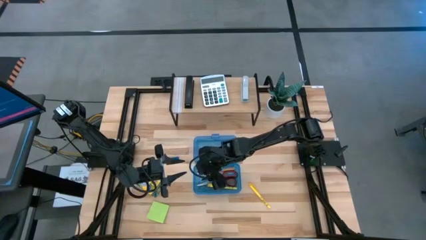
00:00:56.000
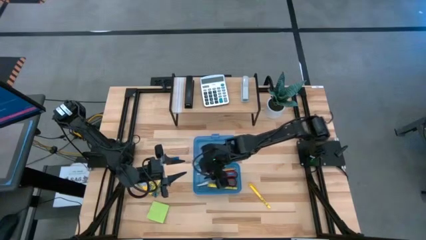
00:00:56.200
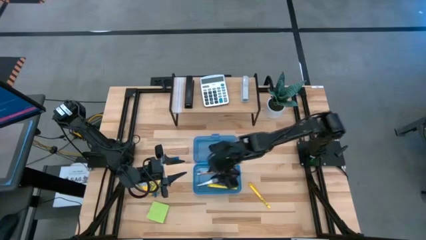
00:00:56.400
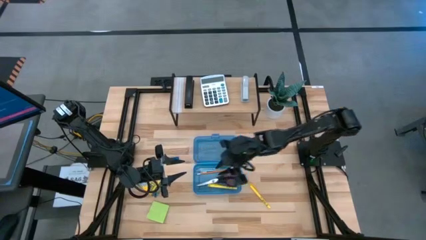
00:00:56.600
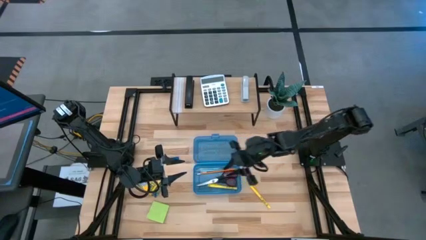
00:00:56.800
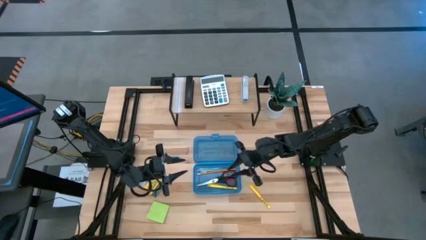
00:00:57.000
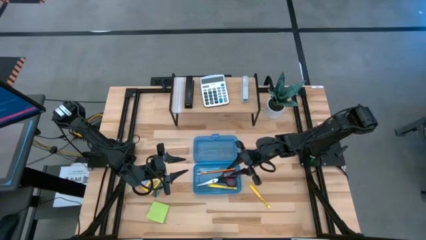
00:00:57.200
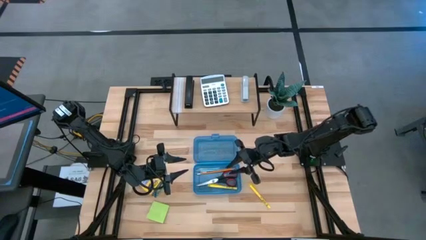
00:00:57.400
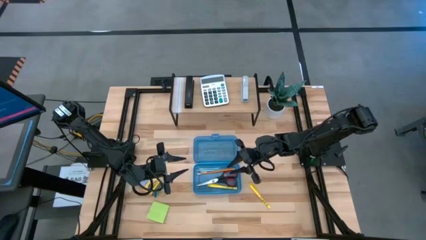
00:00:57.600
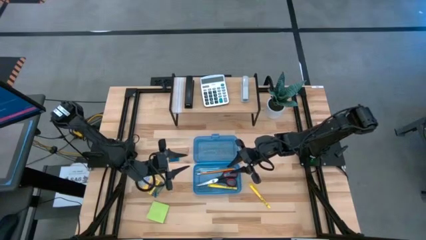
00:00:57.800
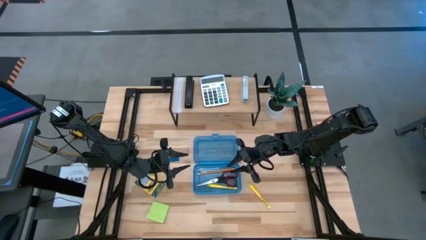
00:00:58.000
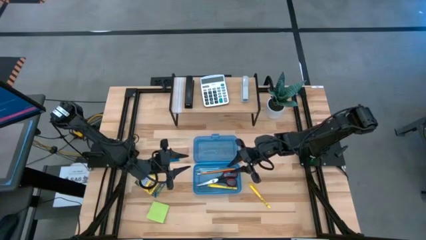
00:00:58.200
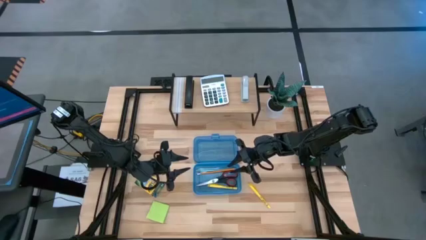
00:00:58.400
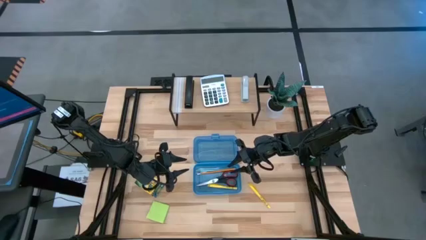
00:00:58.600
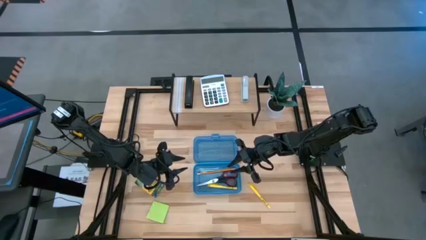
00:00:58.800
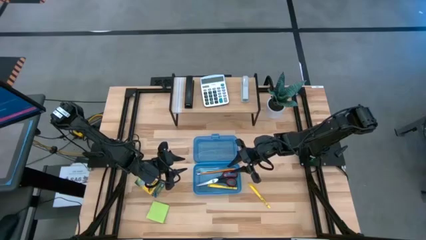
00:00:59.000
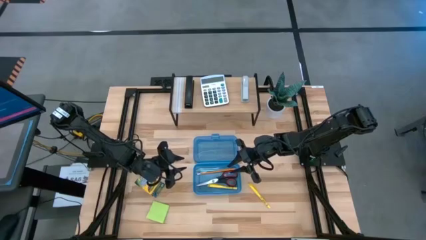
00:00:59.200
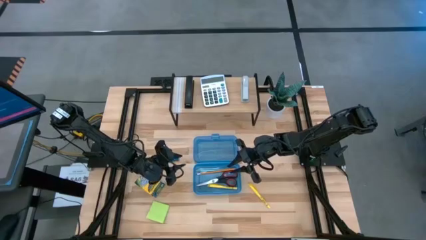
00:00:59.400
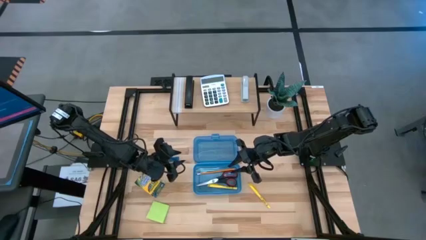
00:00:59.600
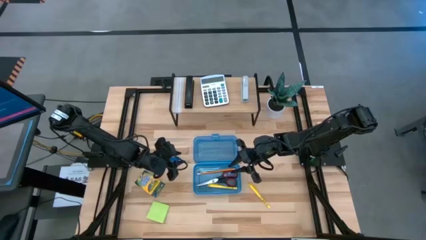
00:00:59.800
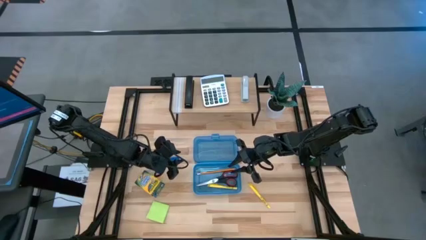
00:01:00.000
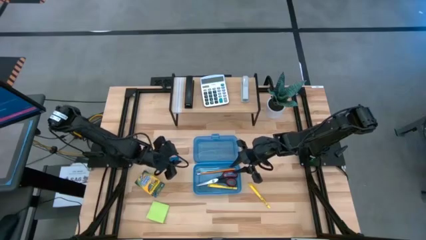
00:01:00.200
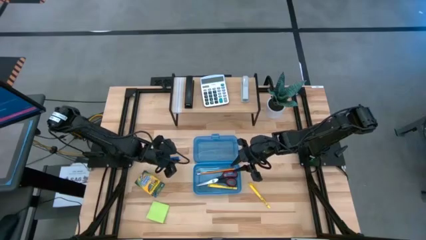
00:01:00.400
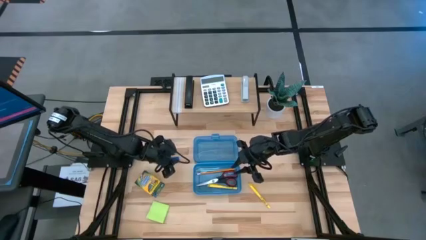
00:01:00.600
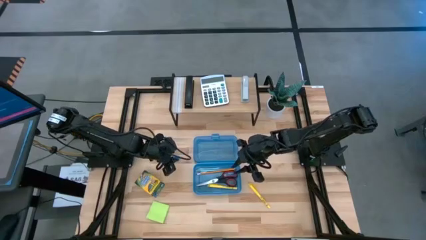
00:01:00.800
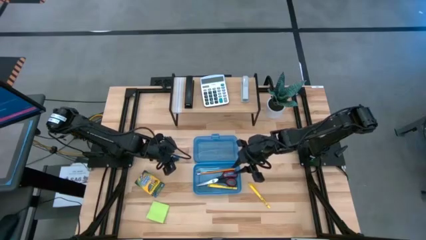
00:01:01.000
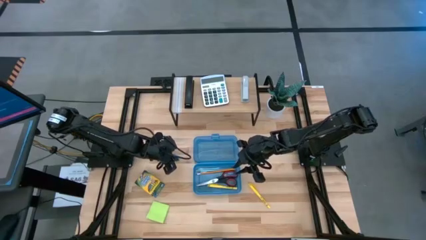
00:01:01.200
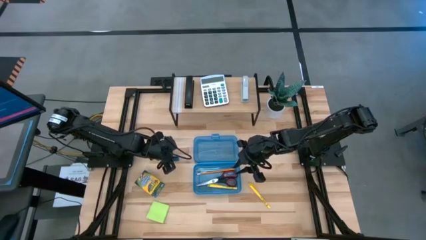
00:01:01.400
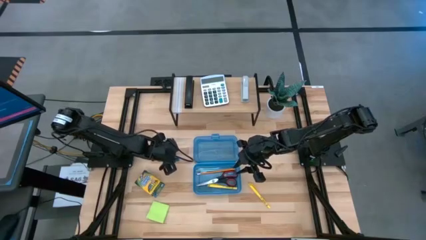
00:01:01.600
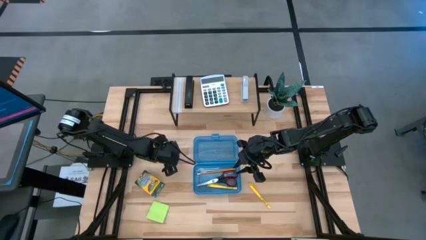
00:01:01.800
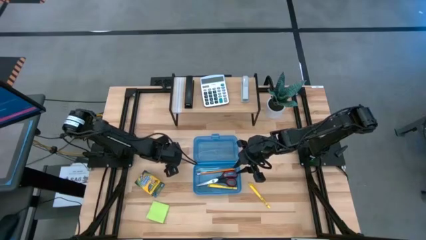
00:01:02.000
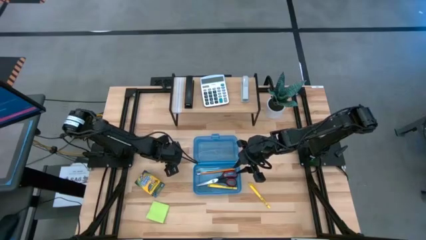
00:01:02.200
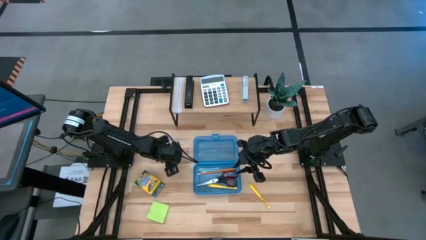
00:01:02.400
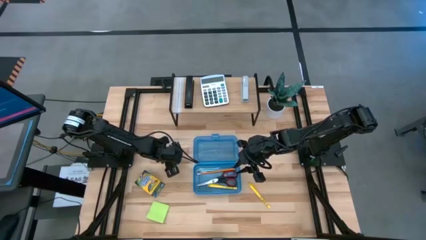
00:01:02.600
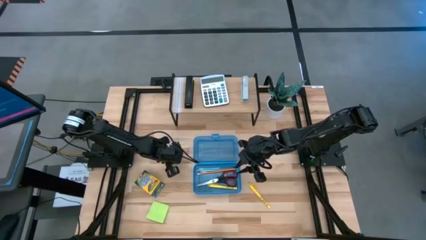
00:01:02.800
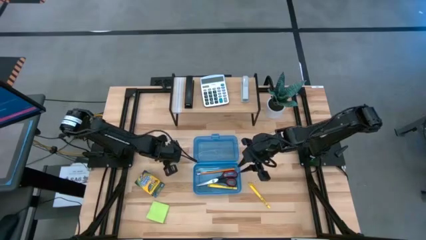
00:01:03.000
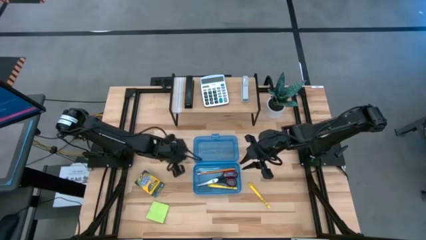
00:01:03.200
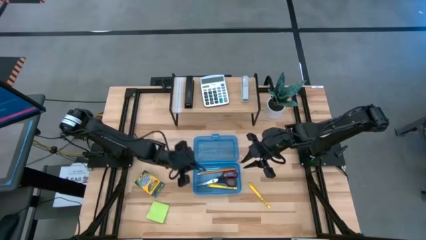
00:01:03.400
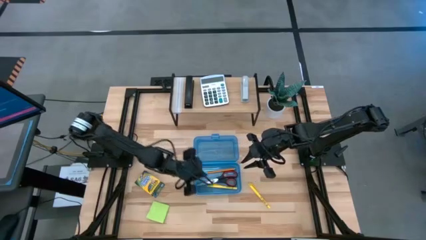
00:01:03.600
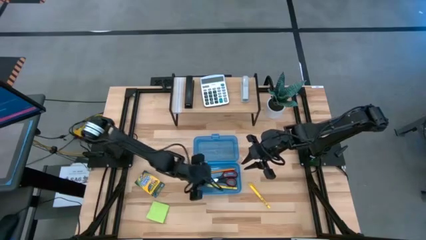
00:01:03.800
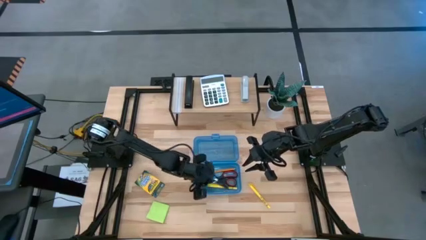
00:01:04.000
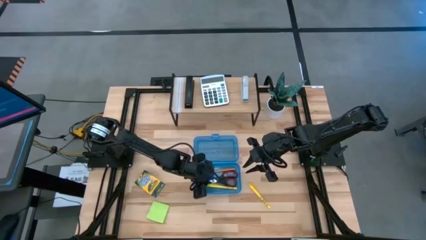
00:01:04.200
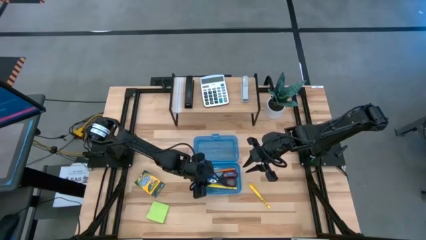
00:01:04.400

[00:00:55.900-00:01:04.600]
Task: Pack school essentials
Put the blue eraser into the blue supply box

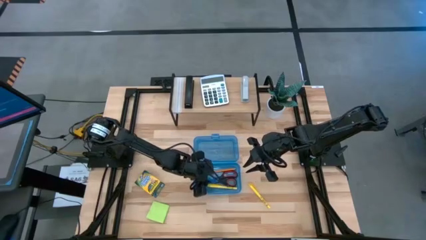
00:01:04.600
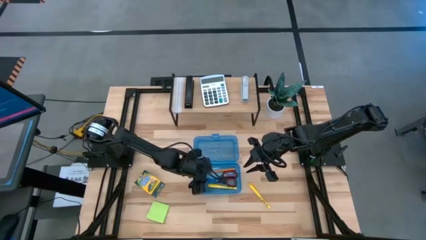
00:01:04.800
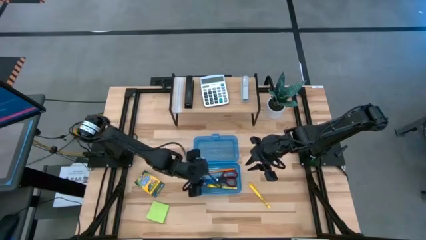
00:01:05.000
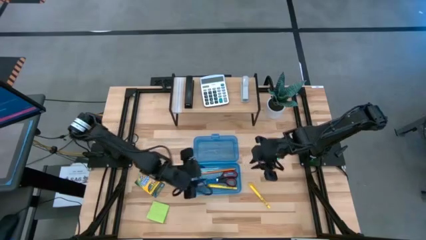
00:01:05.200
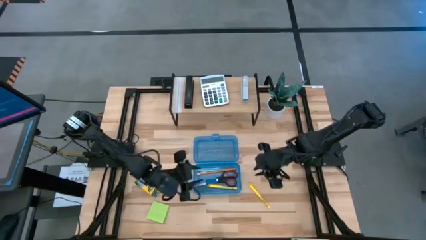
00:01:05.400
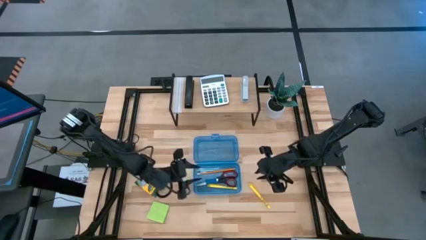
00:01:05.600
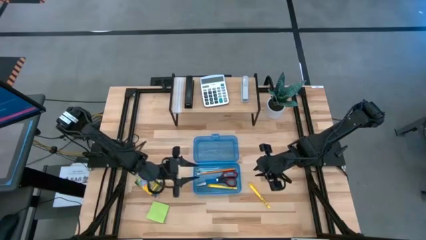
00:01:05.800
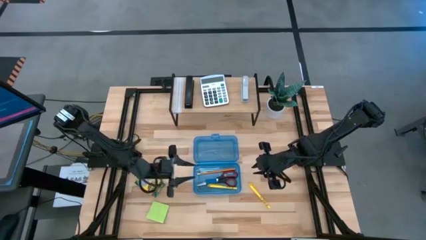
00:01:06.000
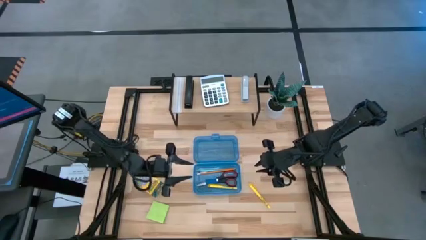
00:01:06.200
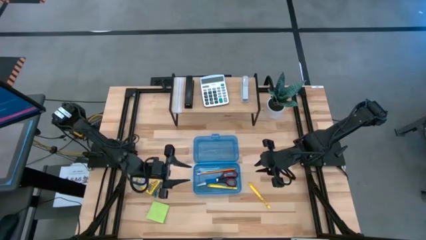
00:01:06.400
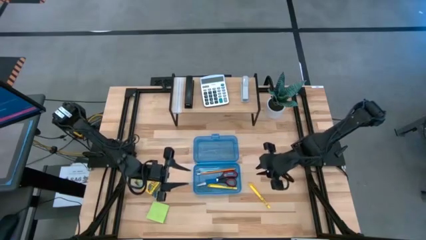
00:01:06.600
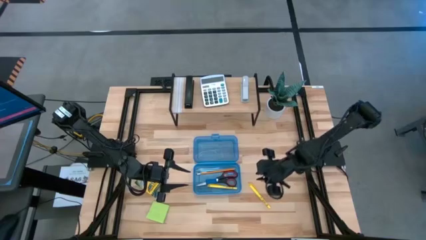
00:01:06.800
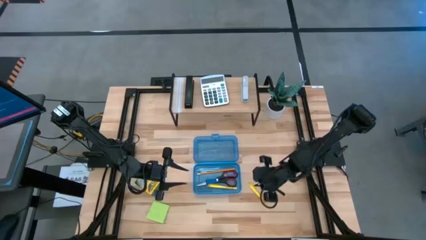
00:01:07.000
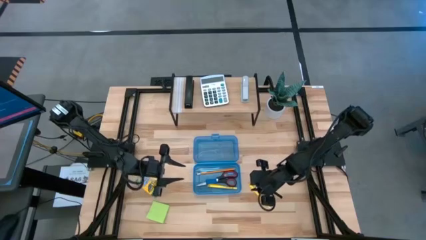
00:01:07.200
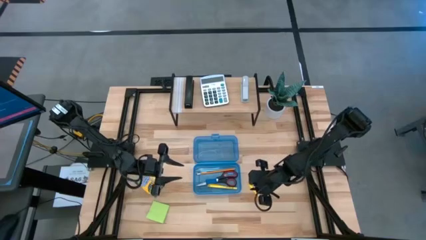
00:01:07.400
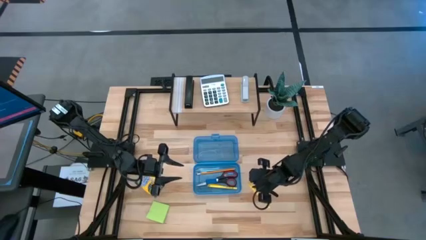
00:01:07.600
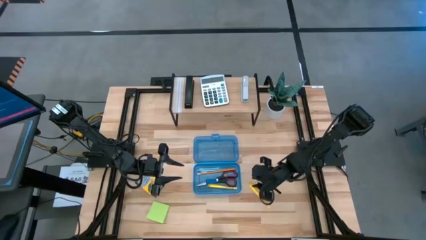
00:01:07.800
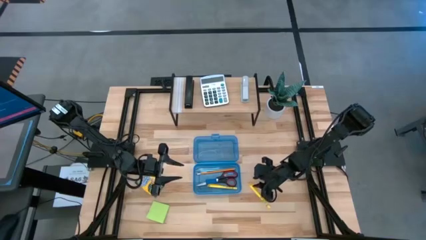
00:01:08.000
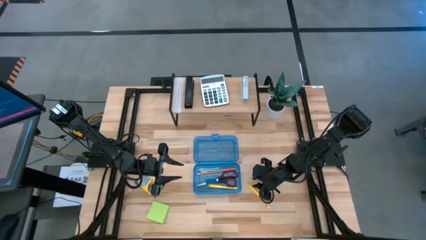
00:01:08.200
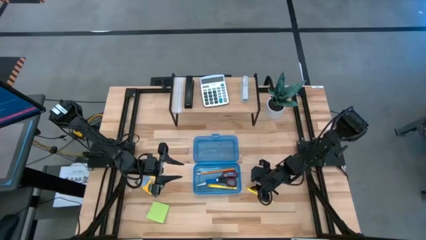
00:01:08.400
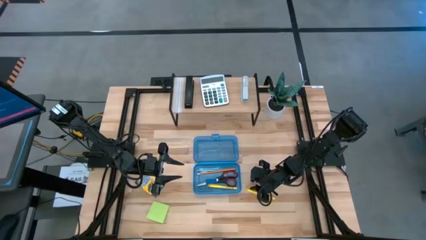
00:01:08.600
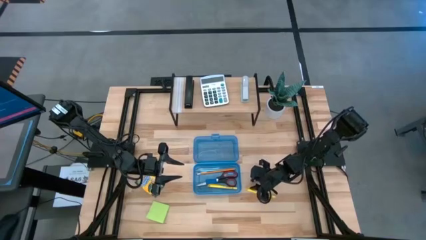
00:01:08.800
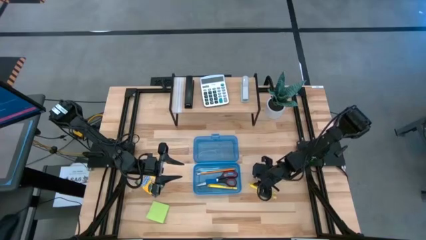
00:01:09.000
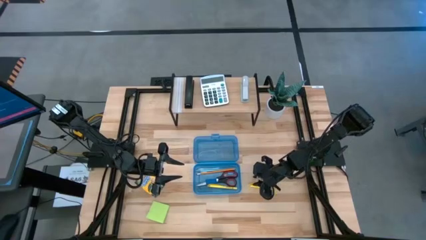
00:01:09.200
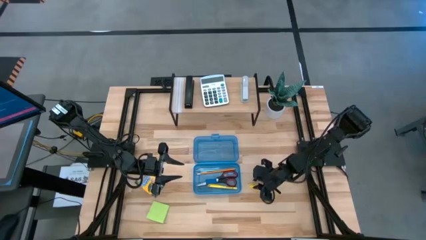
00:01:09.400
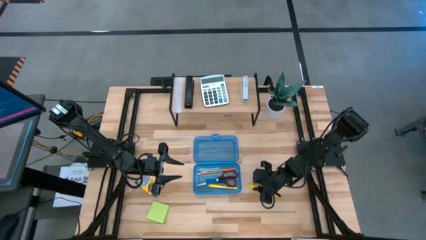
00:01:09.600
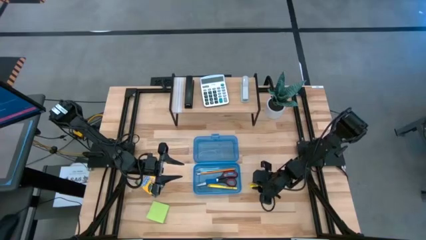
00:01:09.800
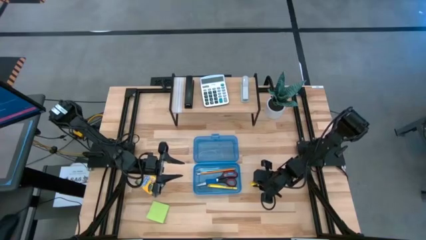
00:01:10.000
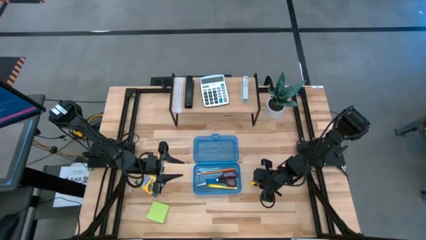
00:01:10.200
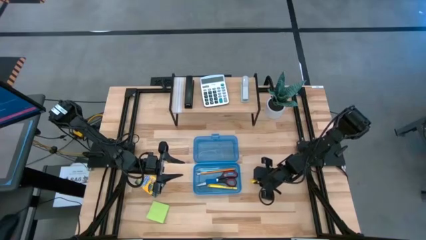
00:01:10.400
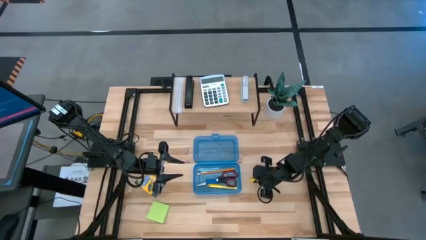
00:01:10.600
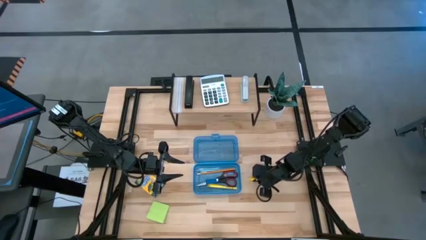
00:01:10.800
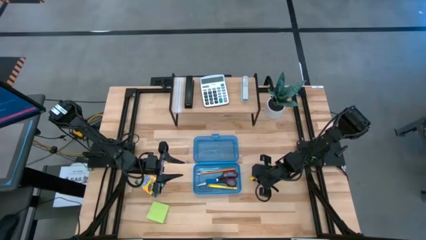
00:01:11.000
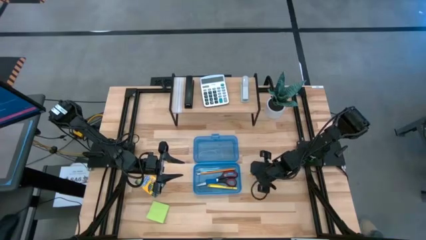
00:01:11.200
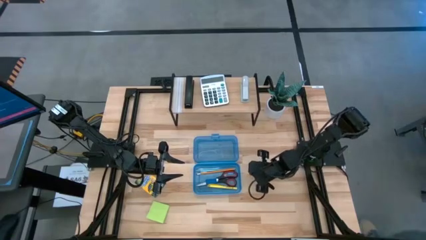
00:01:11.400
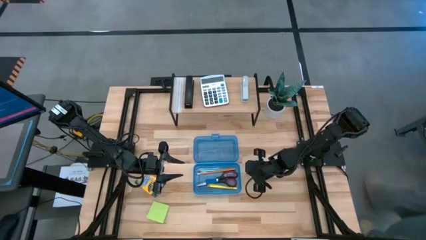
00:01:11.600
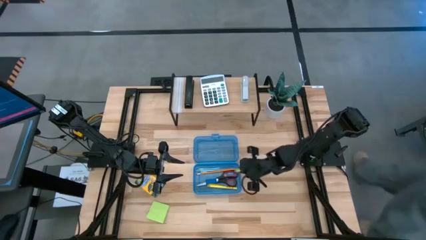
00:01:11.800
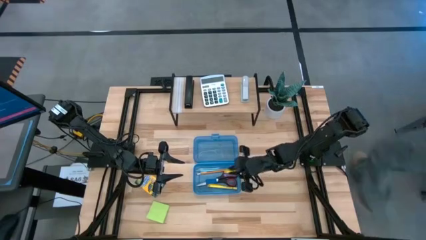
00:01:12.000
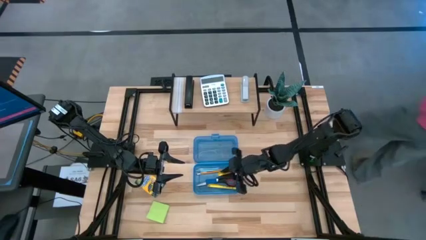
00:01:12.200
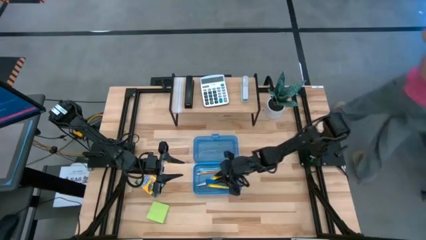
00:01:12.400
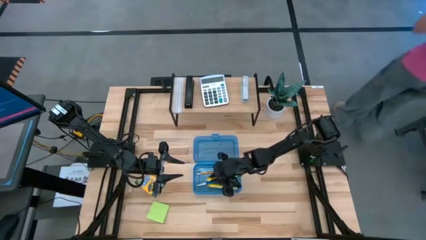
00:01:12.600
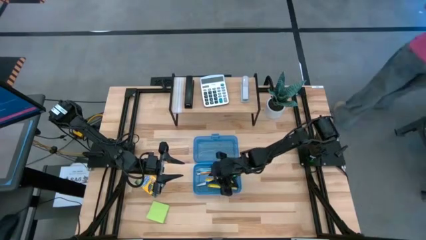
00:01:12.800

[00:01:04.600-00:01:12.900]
Put the yellow pen into the blue supply box
